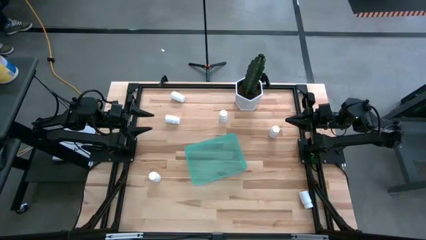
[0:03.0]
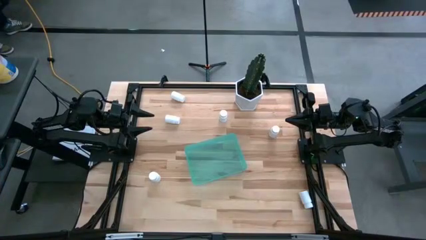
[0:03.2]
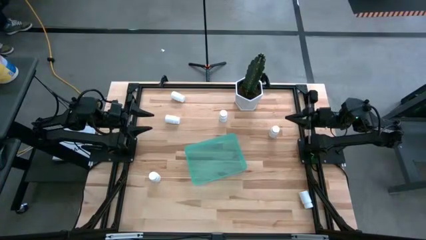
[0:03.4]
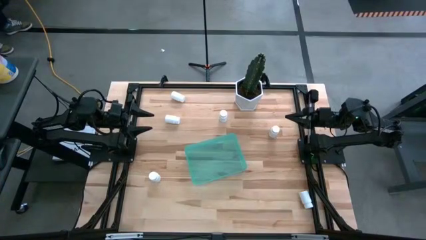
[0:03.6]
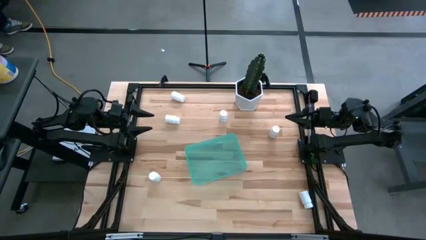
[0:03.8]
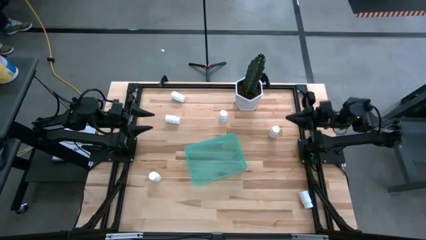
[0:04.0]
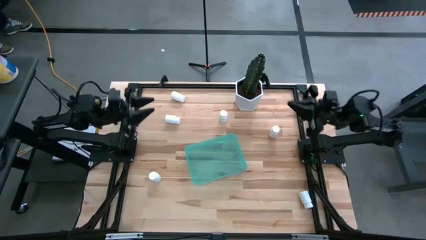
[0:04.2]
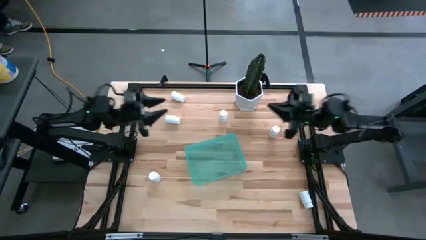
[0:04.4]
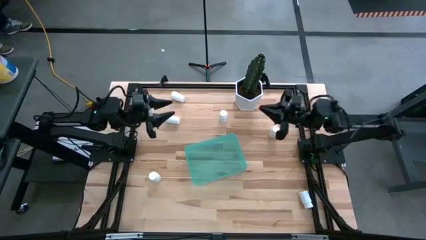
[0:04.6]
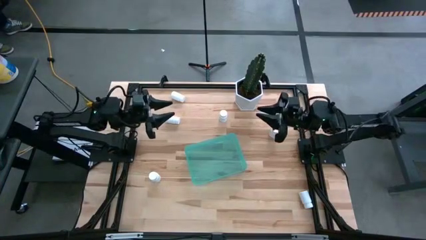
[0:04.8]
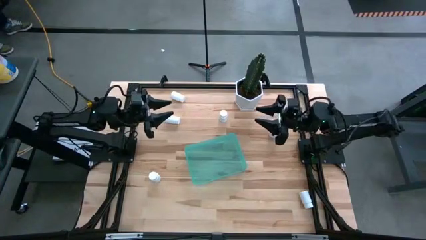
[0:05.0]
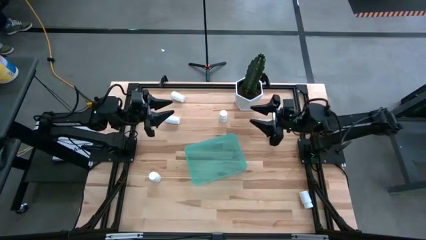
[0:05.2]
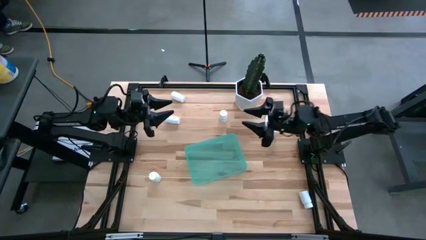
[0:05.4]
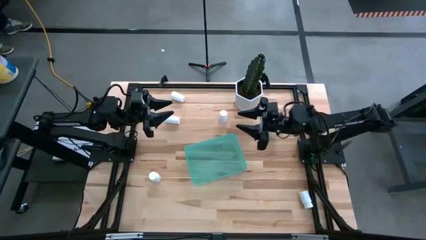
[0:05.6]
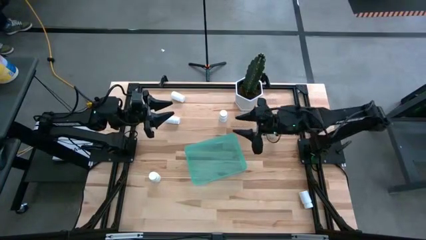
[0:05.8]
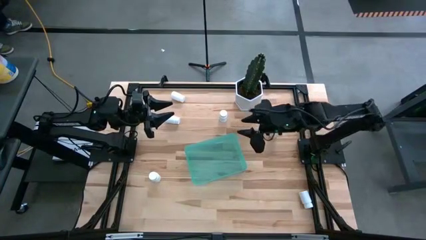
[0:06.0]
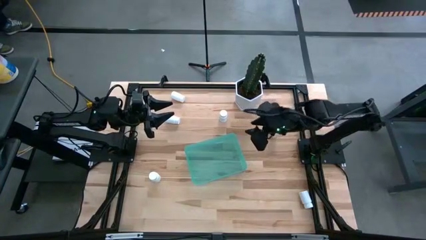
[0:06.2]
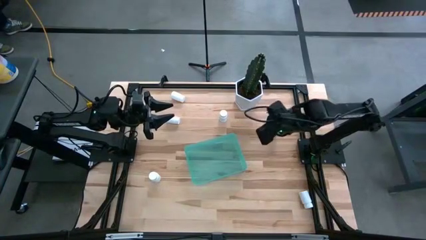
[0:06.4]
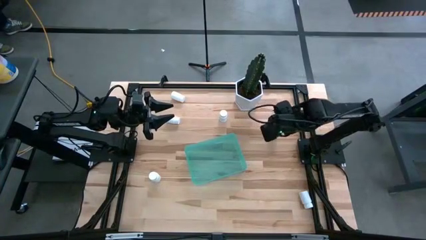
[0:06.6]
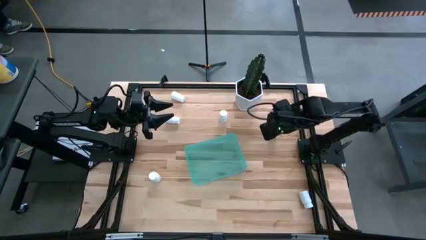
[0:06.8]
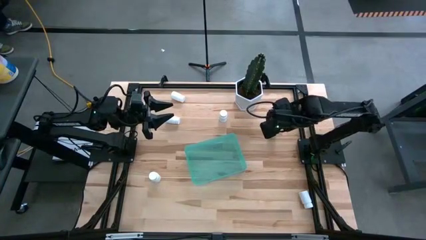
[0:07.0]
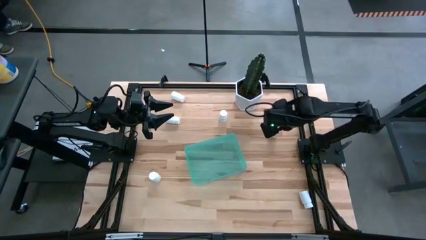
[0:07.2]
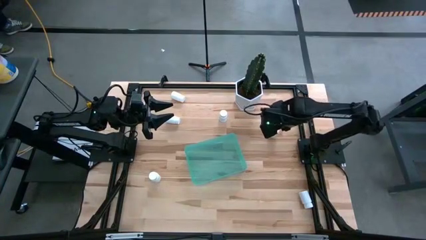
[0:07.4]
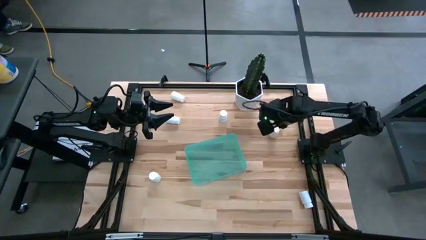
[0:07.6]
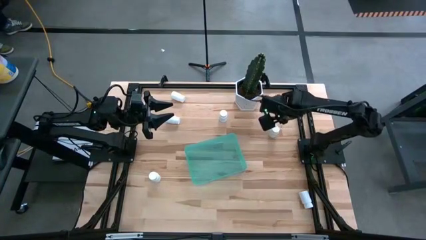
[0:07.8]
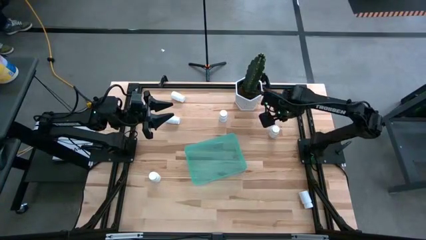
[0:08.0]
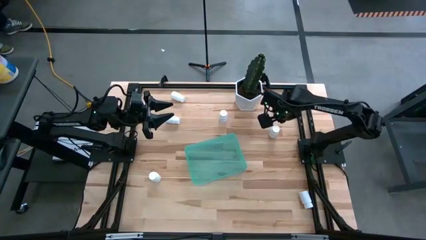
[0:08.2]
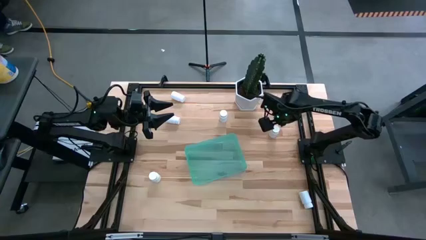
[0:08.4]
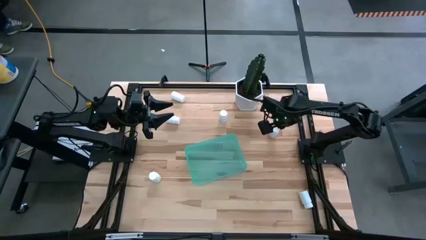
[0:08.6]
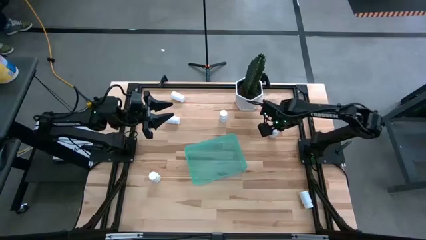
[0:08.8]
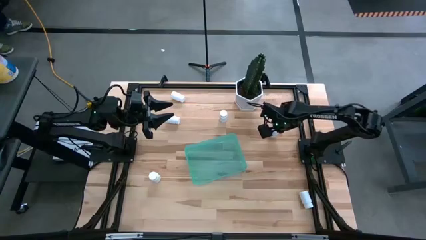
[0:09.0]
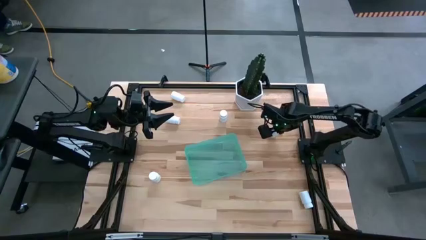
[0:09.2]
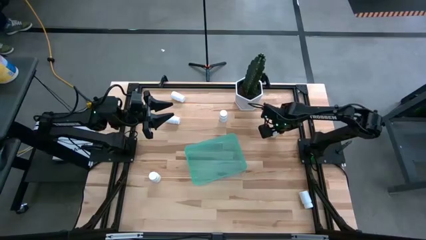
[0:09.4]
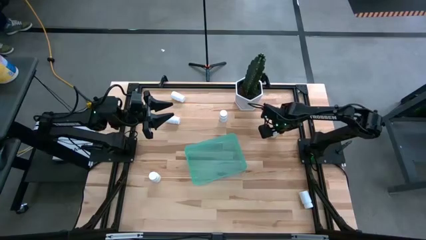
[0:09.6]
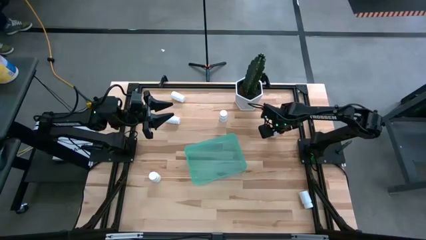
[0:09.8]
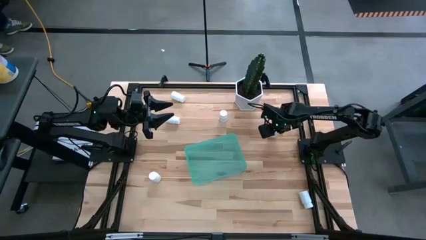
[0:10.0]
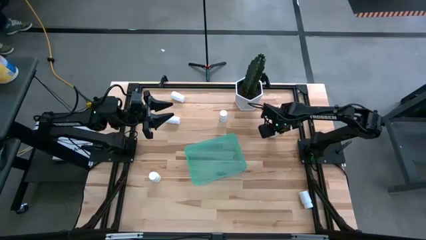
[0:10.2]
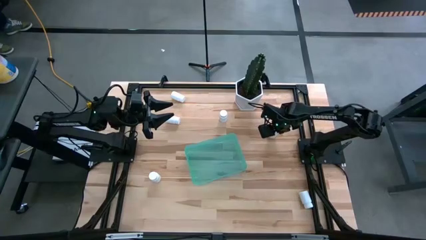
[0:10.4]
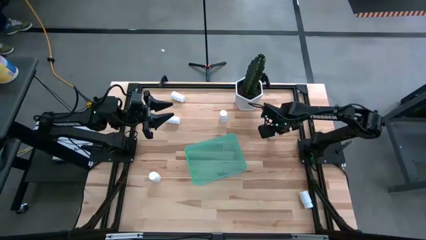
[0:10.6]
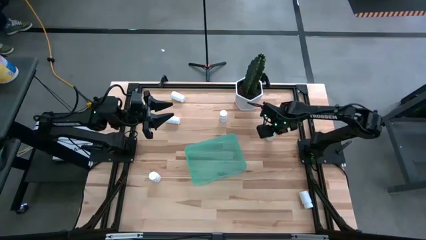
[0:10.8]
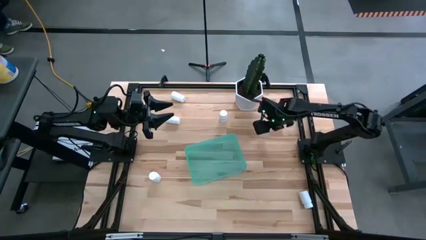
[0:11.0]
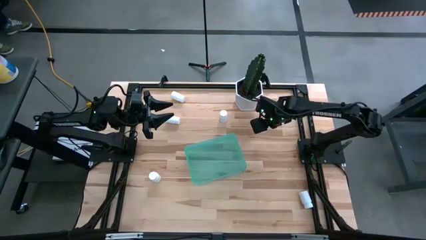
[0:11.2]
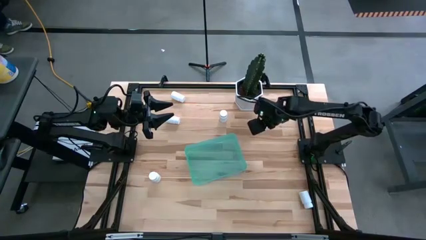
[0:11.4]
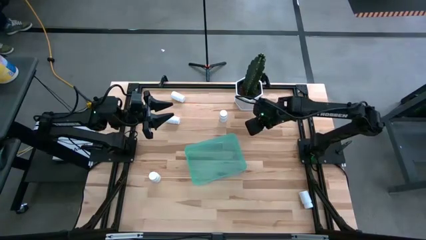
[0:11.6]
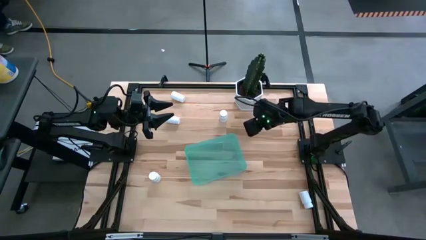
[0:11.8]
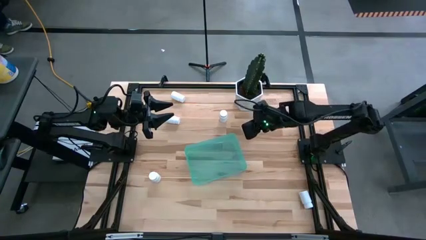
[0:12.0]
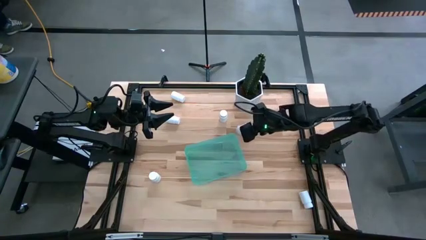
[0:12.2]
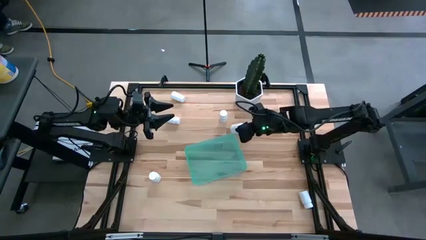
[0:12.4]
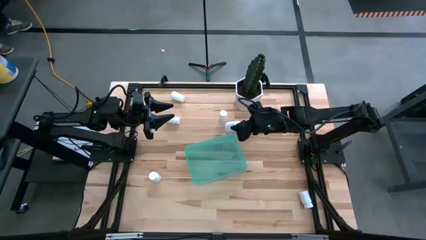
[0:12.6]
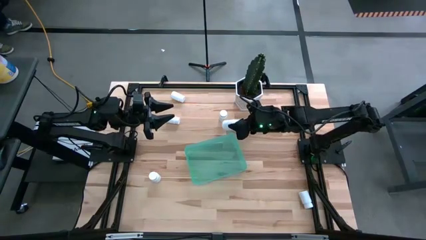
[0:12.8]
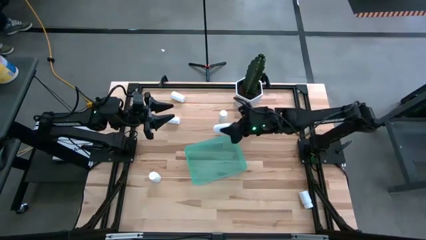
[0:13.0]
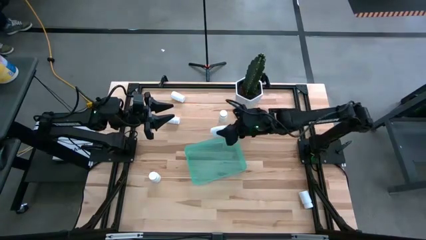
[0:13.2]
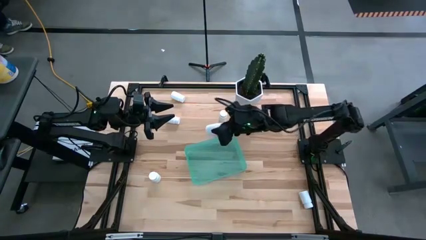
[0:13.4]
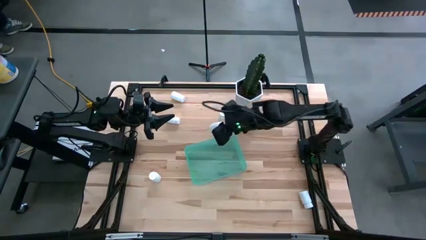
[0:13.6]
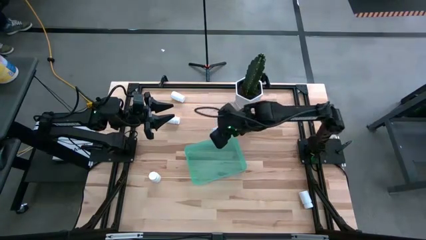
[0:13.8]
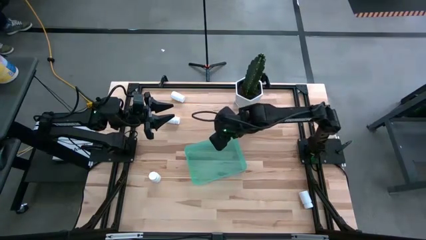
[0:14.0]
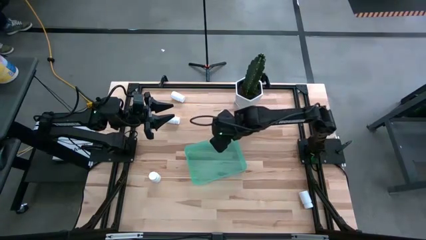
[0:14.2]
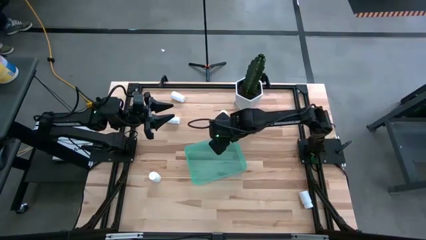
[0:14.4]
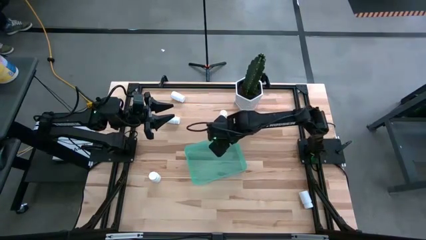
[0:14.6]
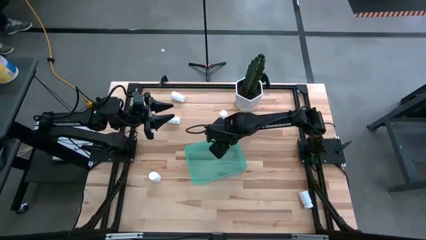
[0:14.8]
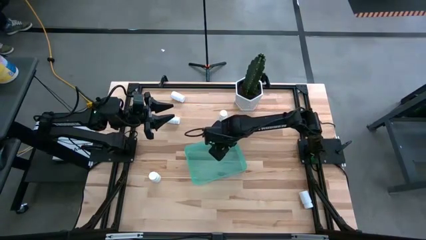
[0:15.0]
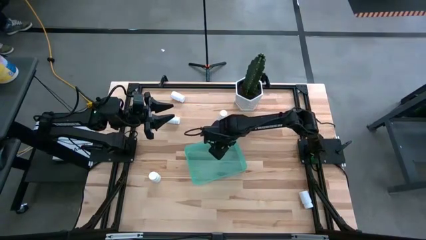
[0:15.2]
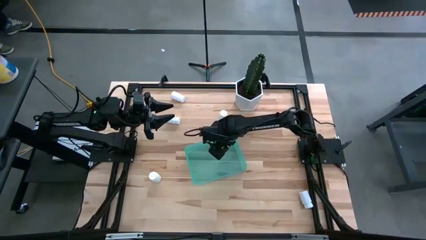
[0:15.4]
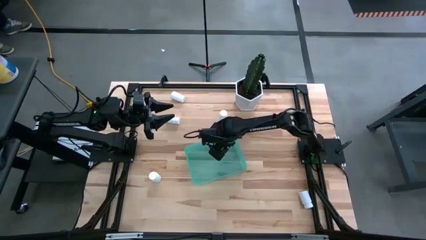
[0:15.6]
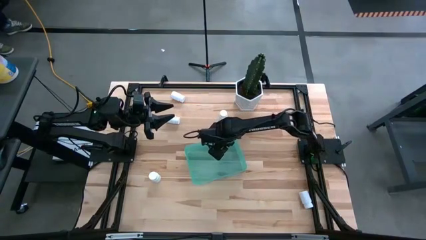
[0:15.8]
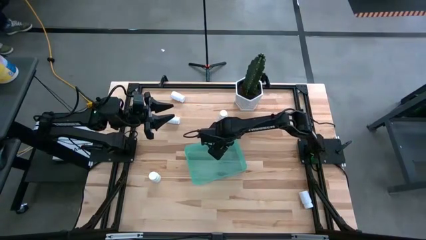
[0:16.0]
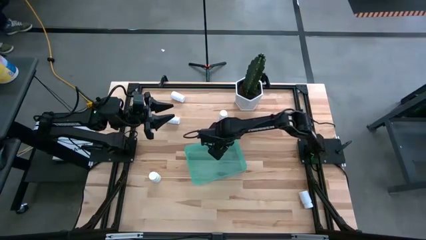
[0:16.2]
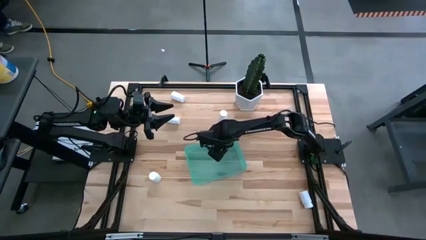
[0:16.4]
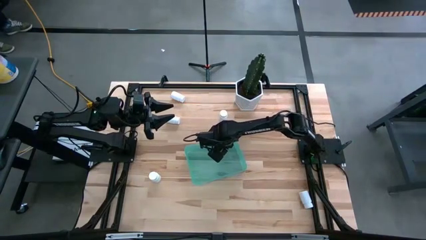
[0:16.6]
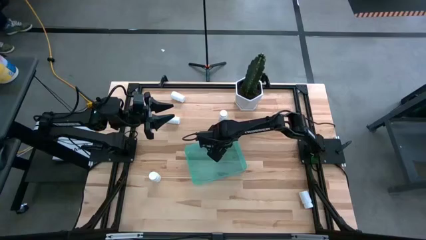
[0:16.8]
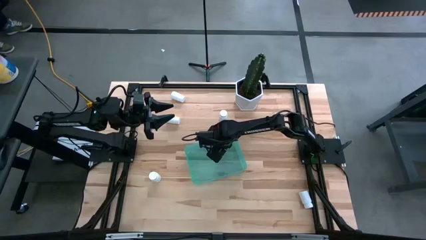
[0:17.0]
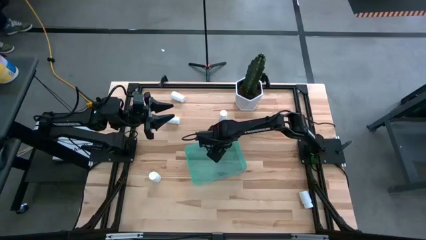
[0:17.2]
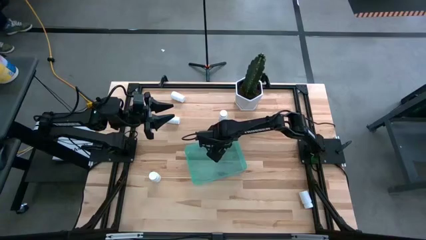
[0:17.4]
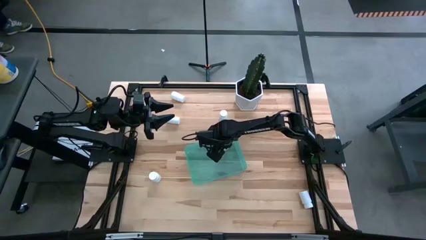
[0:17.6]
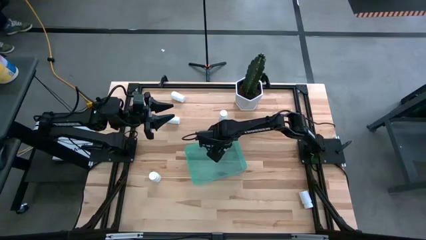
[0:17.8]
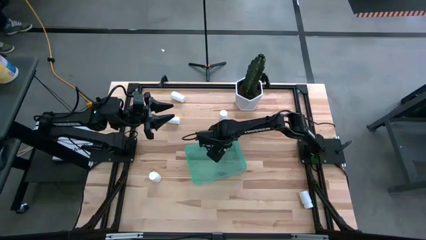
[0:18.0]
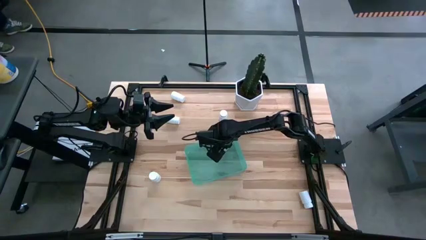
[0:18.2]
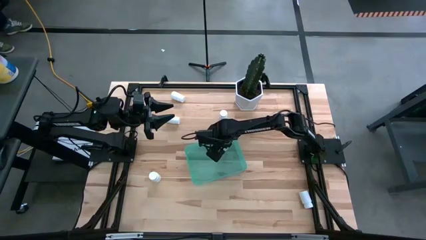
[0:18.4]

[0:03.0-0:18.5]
Task: Pick and place pill bottles into a basket
Put the white pill bottle into the green bin
